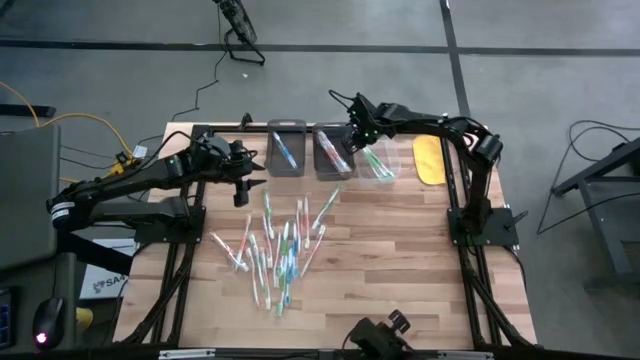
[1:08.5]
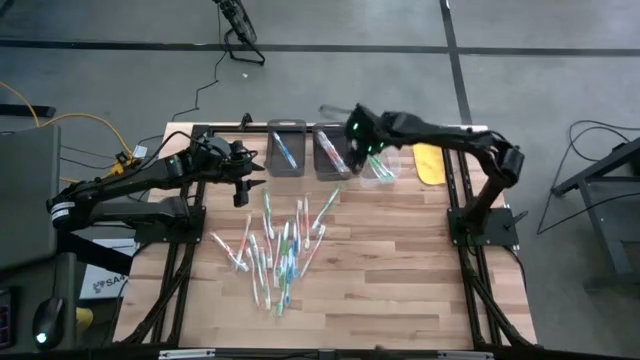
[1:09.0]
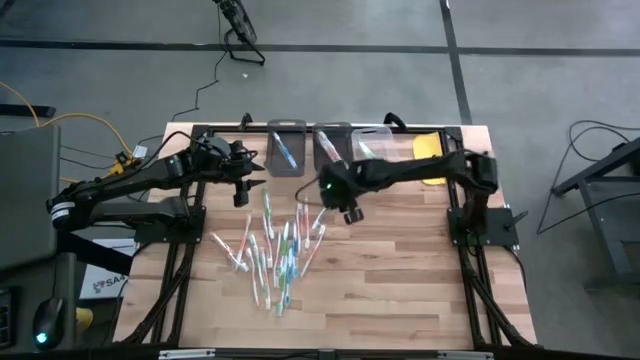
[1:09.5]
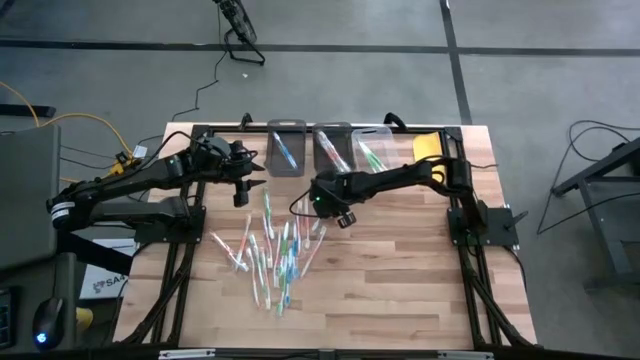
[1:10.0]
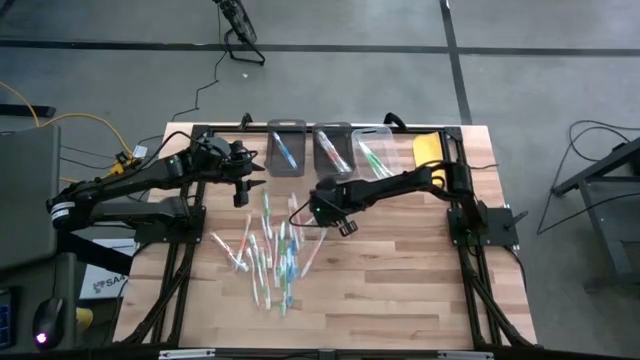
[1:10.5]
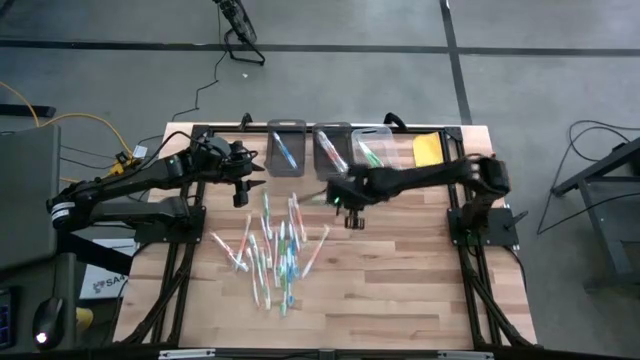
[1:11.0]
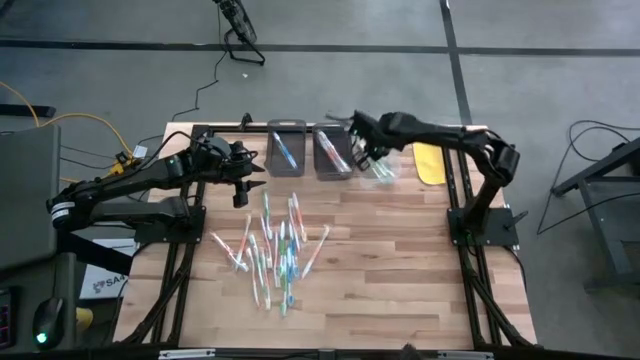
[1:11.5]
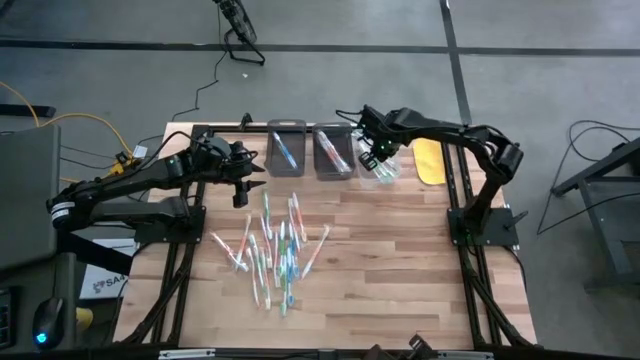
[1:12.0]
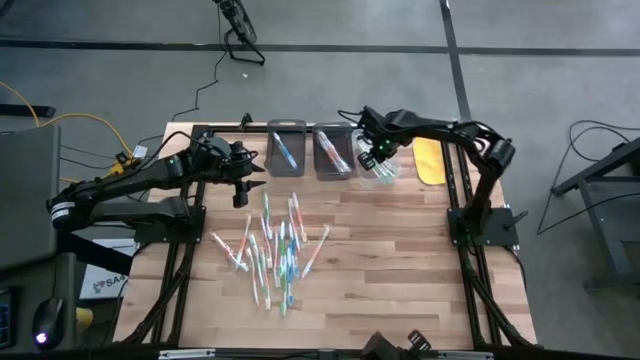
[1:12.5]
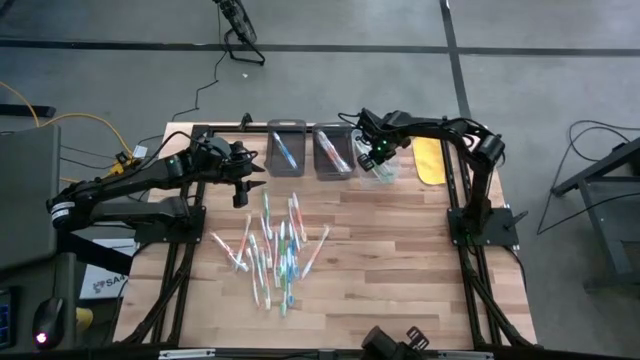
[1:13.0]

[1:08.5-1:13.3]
Task: Pick & Place Toothbrushes
Put the green toothbrush into the transparent bin

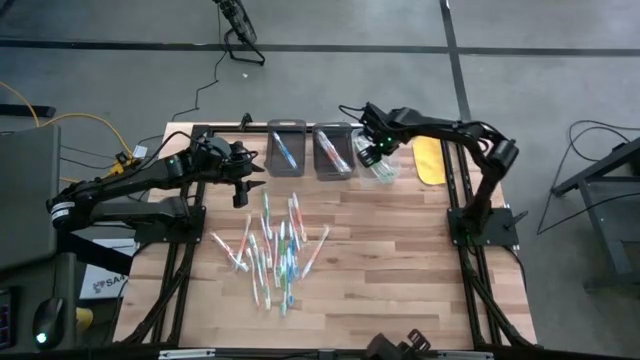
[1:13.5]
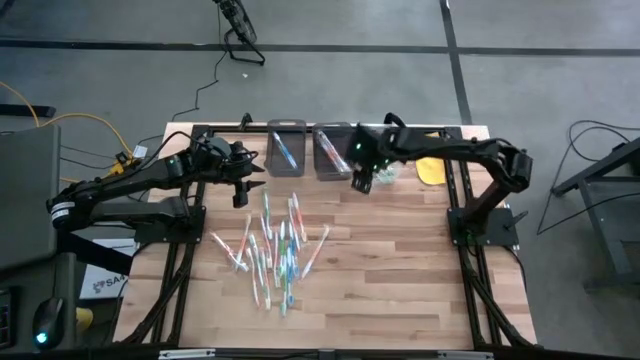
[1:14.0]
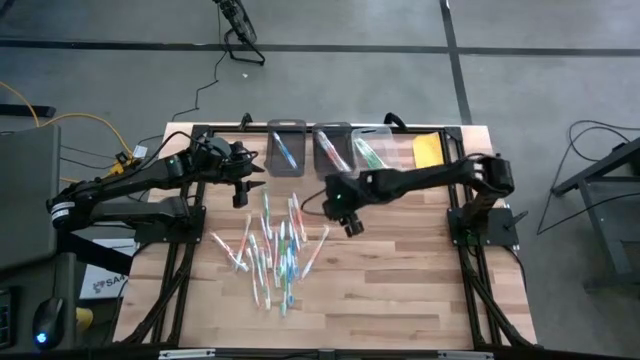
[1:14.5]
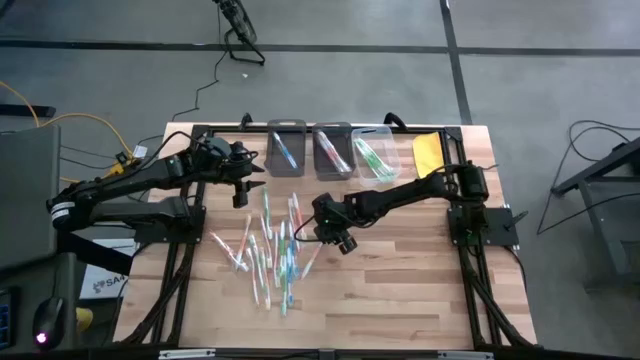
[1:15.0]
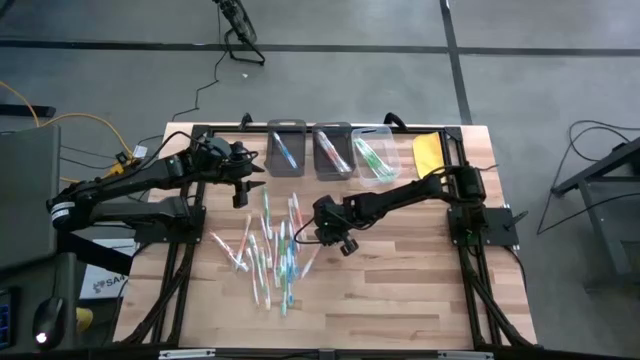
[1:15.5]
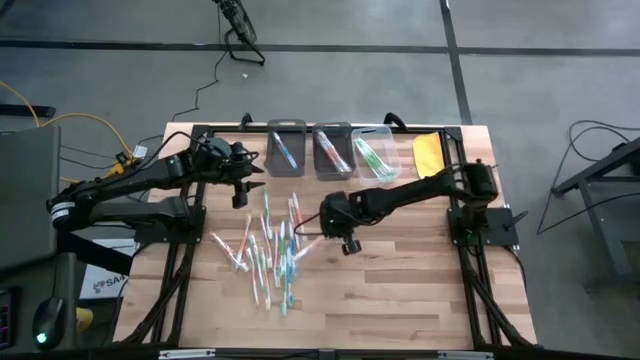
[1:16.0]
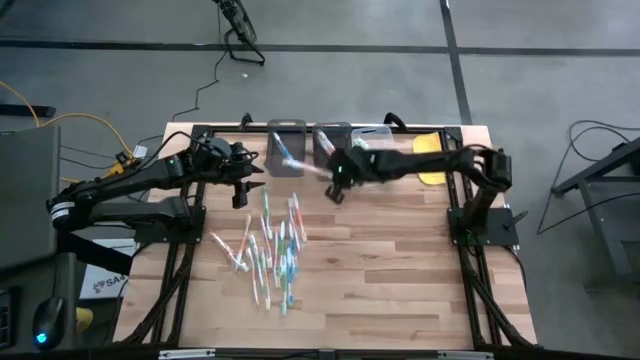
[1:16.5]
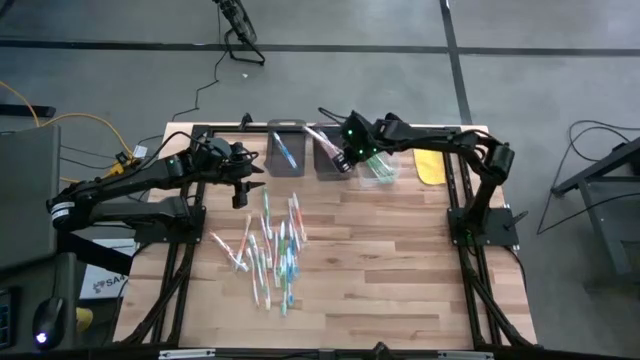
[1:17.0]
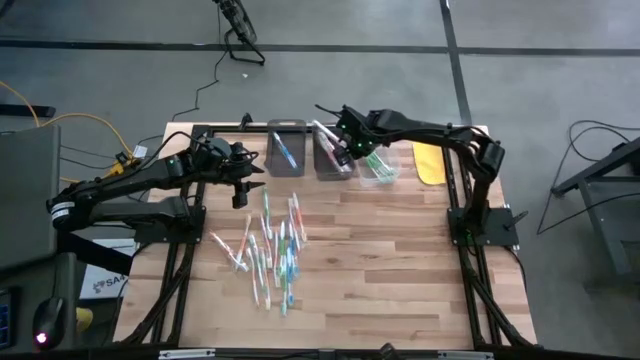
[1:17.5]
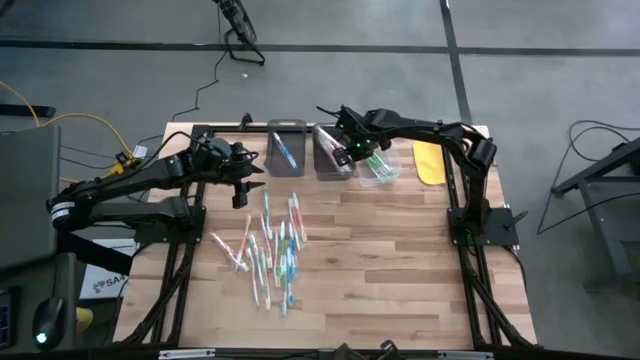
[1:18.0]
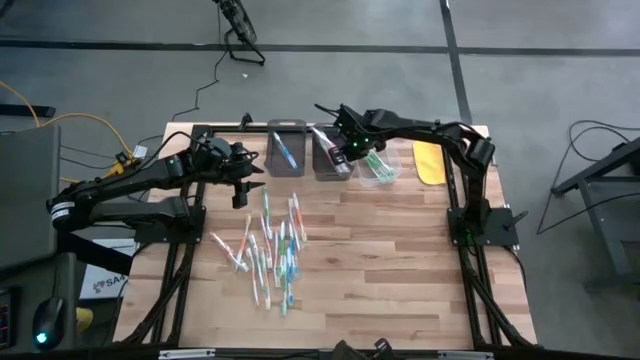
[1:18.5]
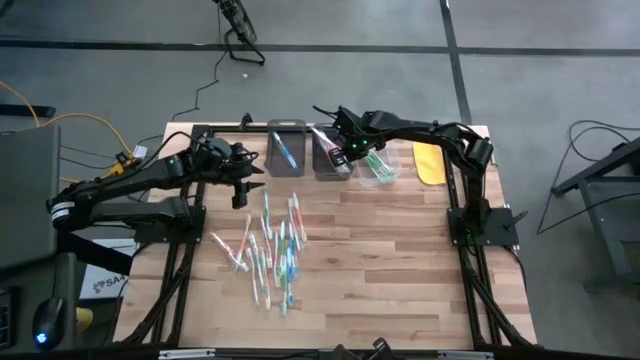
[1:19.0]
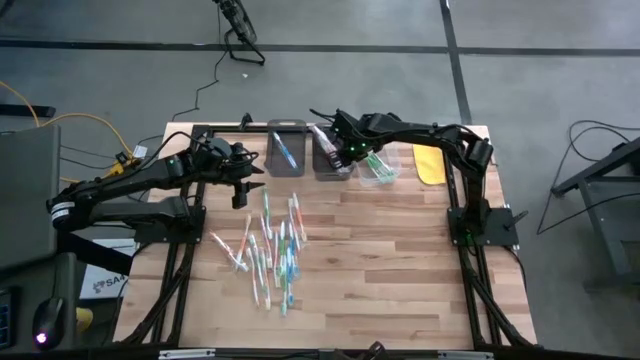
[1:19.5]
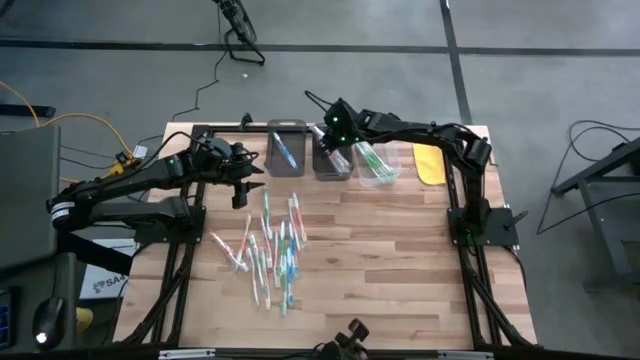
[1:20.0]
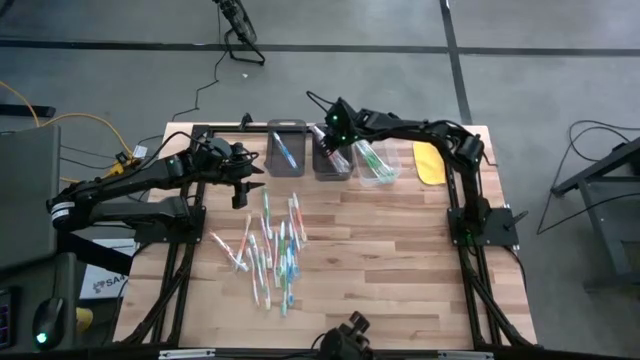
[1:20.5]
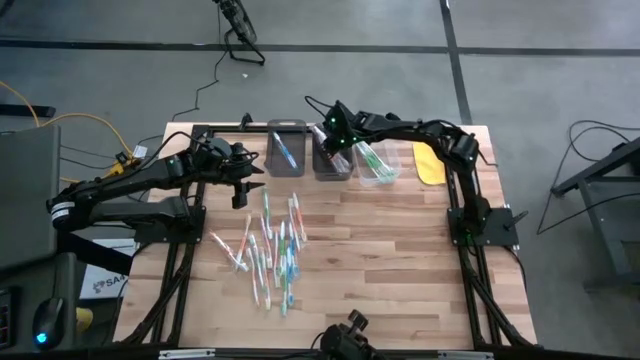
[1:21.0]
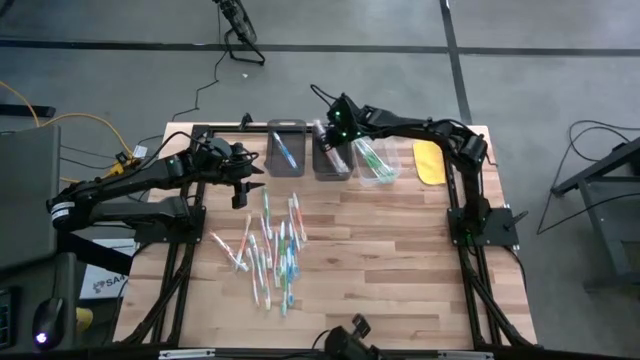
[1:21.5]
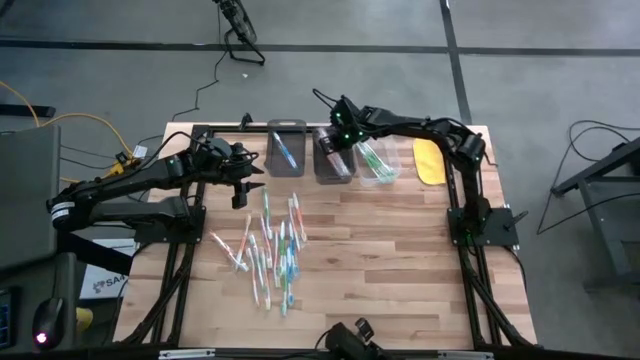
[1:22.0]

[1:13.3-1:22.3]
Put the orange toothbrush into the right black bin

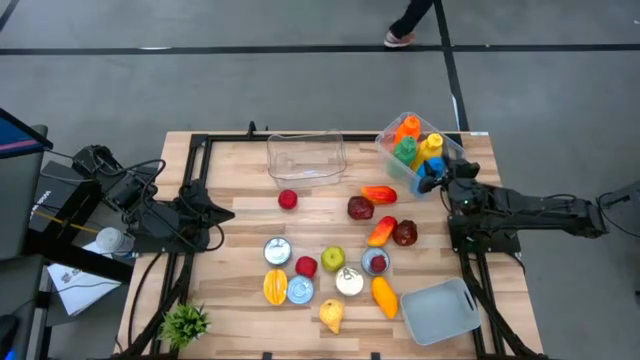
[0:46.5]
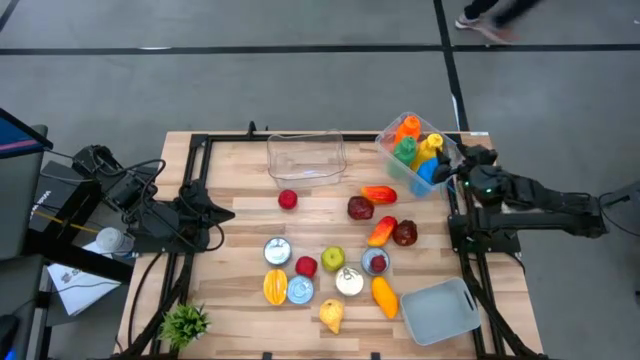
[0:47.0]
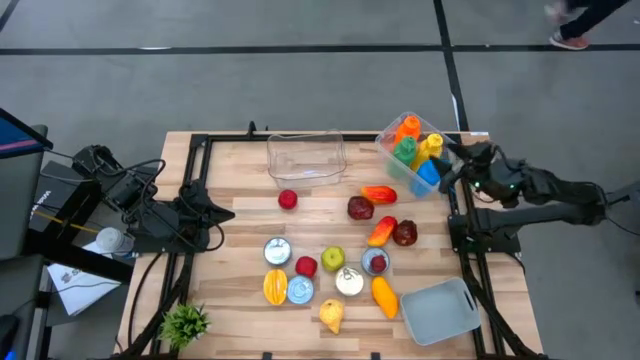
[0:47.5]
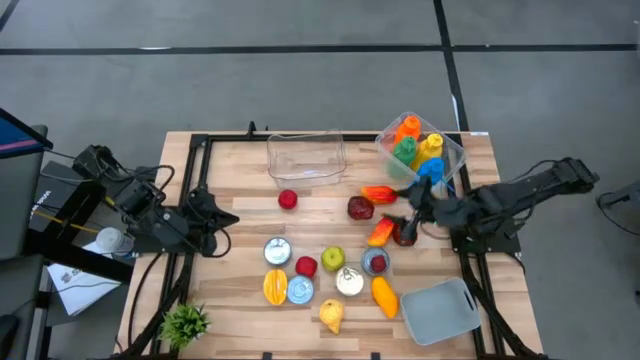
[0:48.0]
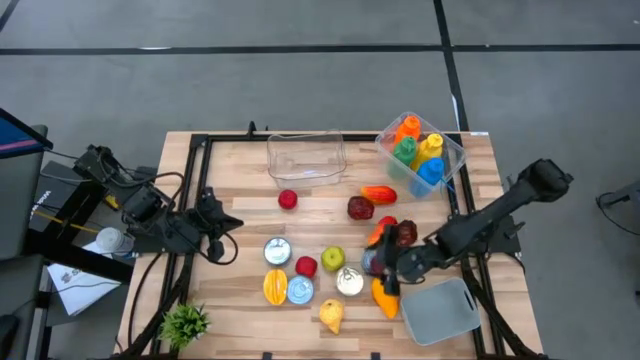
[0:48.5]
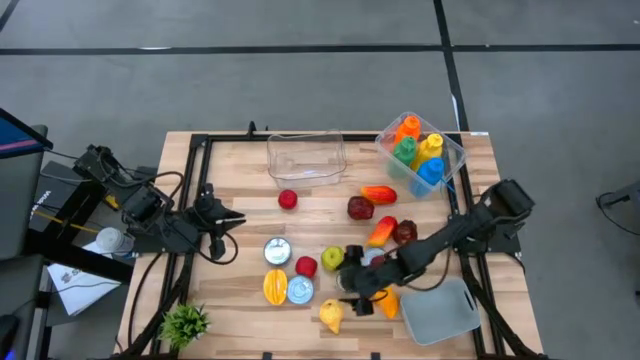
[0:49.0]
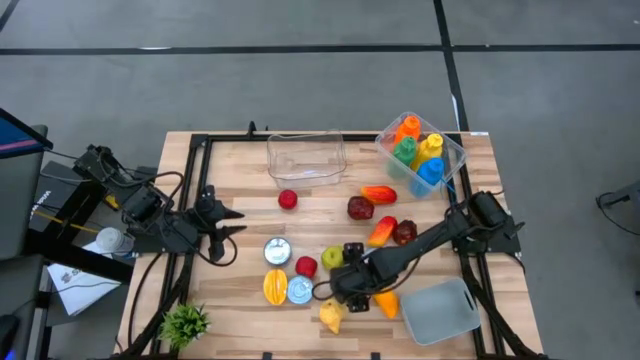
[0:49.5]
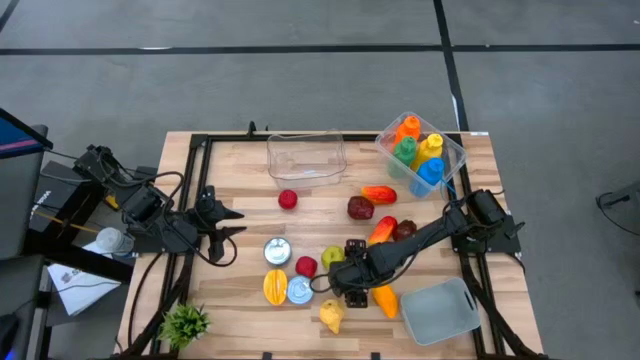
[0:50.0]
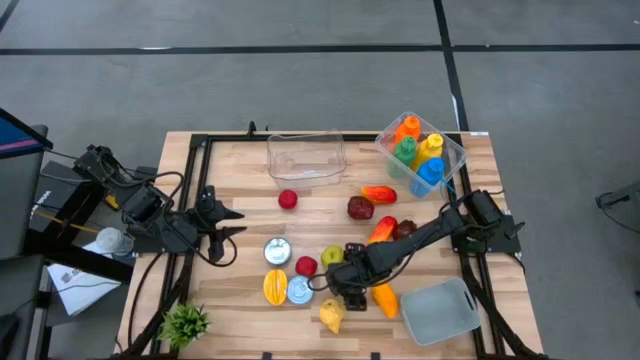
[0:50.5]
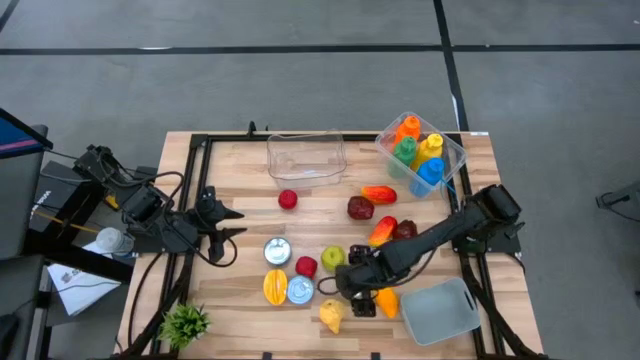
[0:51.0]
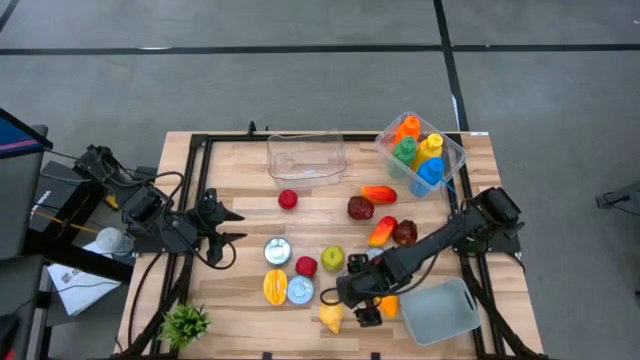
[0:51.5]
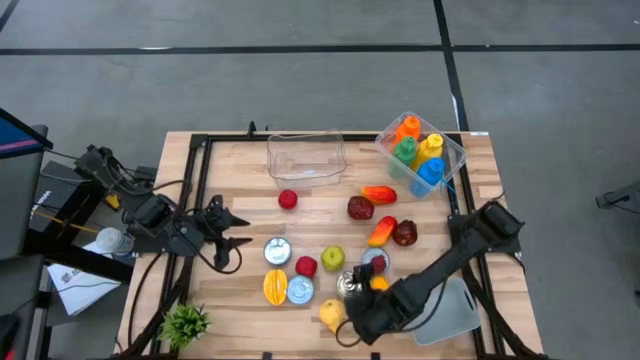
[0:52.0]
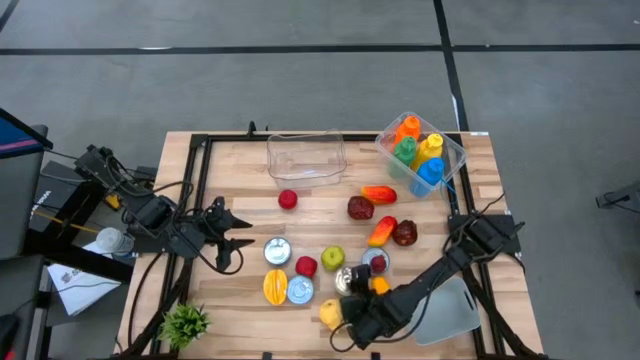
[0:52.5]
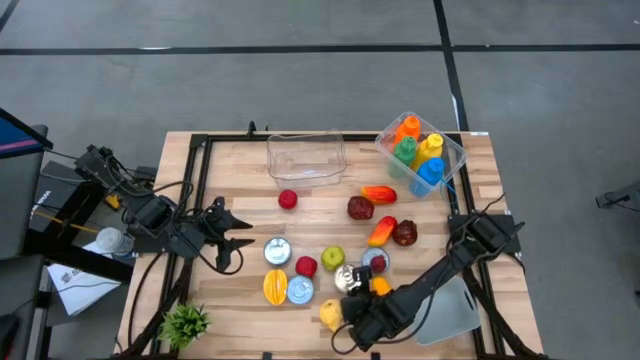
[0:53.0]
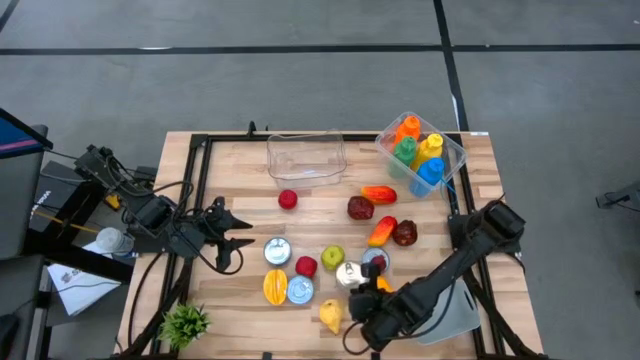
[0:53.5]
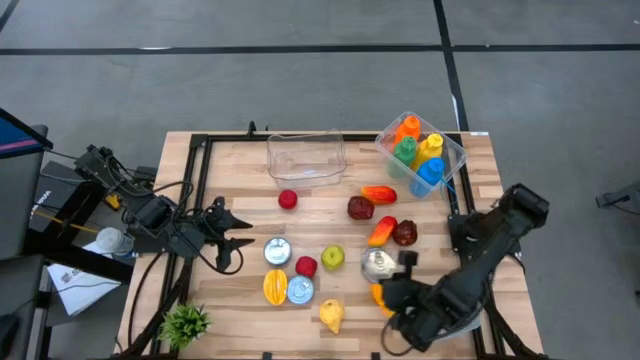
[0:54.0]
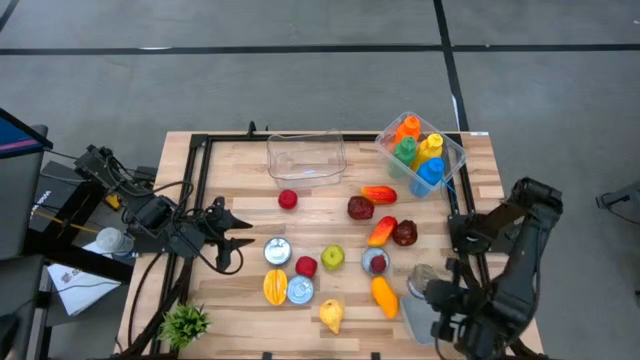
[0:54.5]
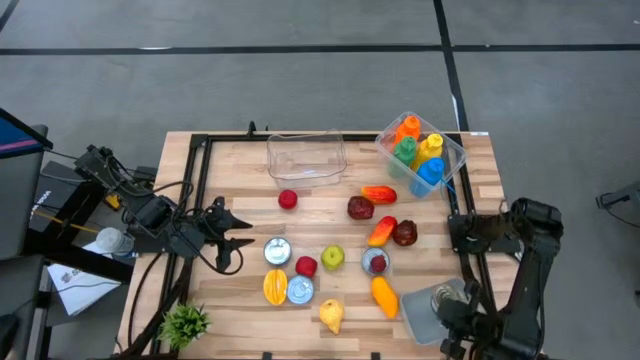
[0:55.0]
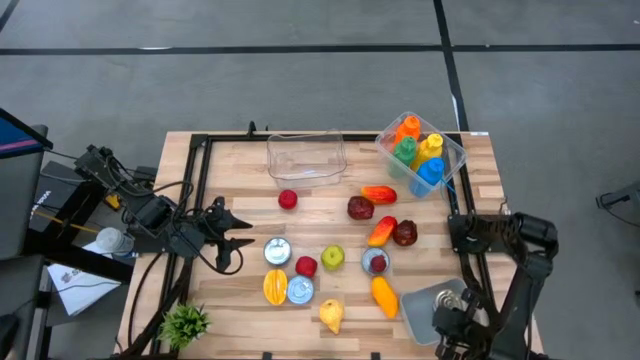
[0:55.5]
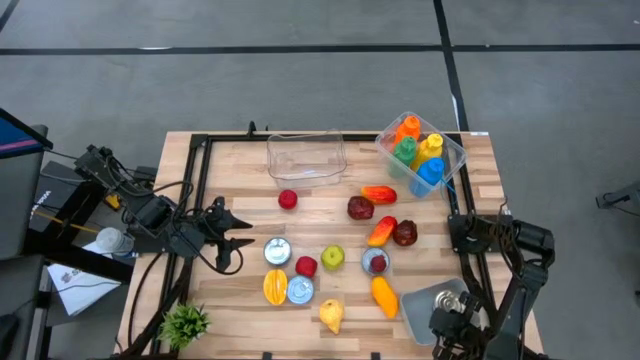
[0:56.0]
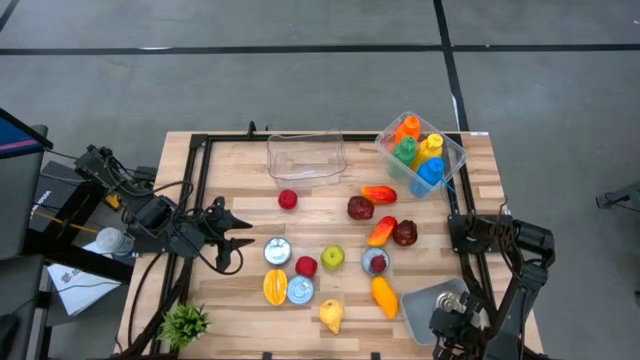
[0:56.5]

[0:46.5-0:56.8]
Task: Pick & Place Food Item
Put the blue and pink tuna can into the gray bin
